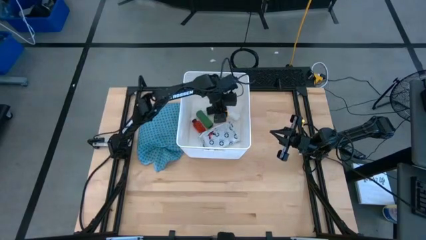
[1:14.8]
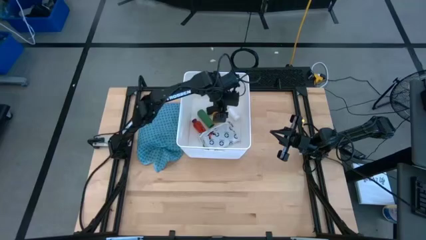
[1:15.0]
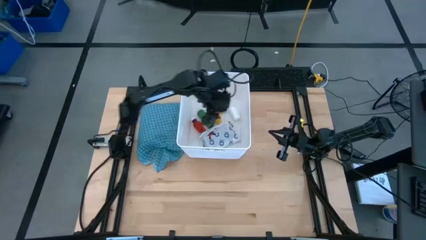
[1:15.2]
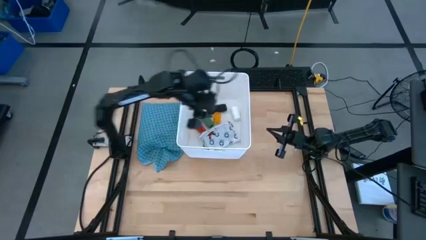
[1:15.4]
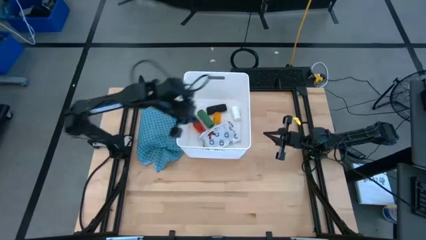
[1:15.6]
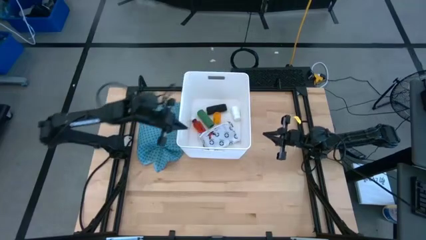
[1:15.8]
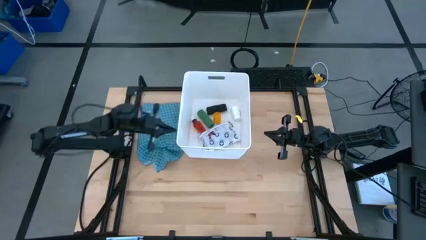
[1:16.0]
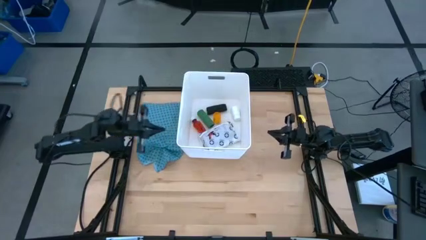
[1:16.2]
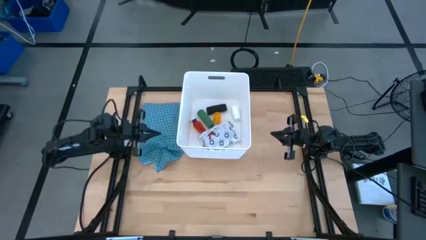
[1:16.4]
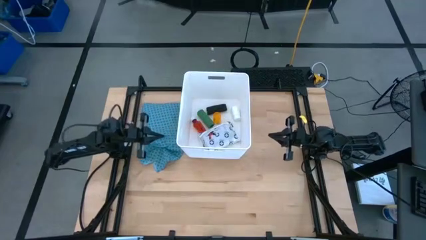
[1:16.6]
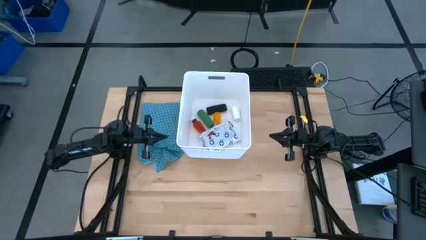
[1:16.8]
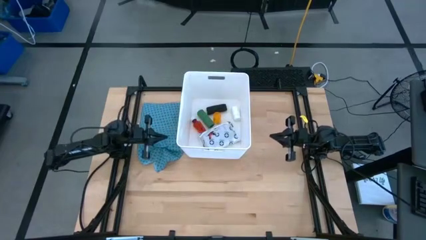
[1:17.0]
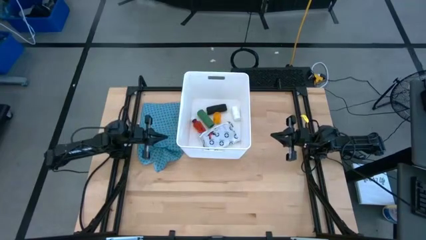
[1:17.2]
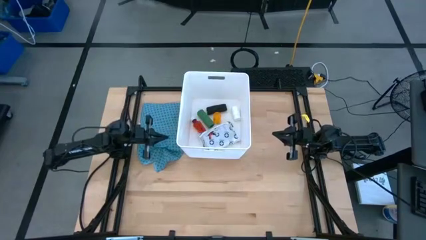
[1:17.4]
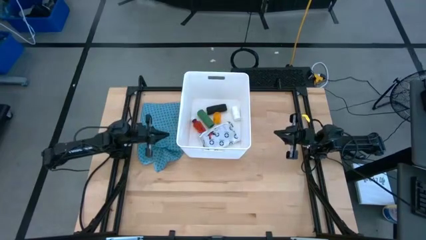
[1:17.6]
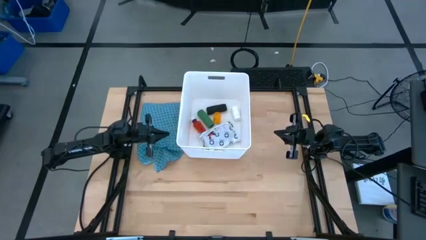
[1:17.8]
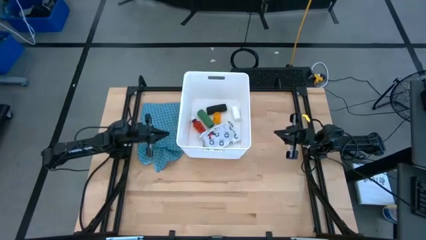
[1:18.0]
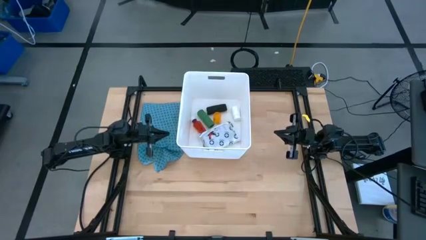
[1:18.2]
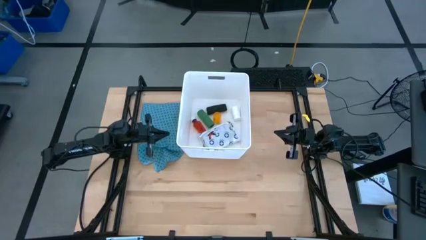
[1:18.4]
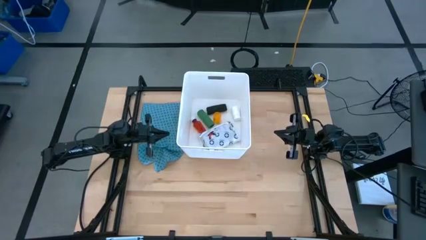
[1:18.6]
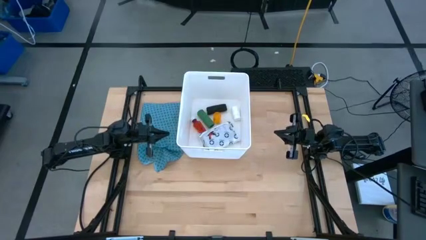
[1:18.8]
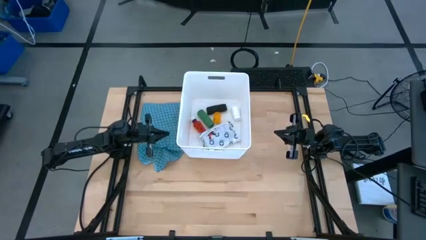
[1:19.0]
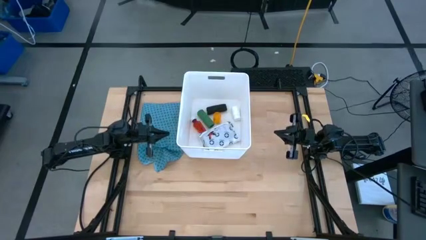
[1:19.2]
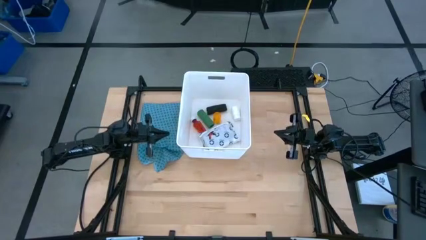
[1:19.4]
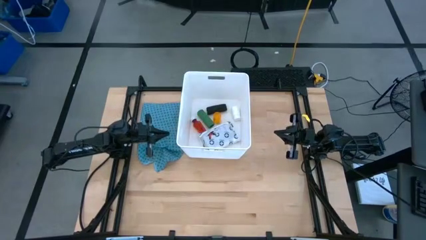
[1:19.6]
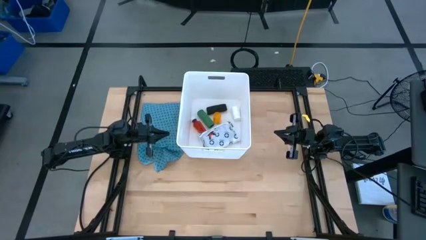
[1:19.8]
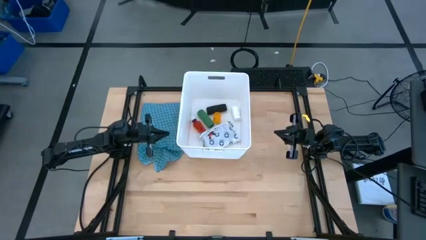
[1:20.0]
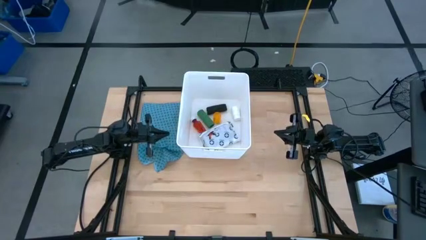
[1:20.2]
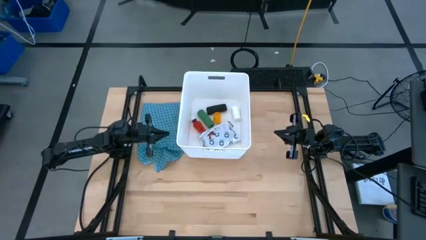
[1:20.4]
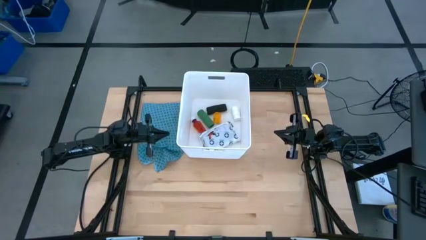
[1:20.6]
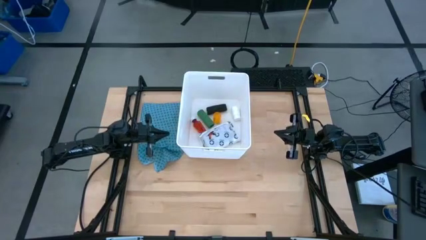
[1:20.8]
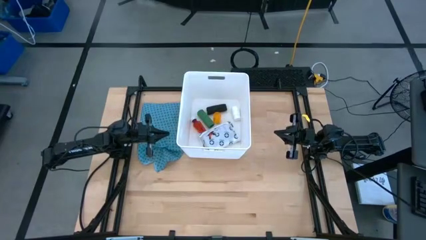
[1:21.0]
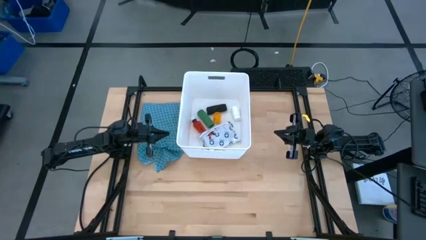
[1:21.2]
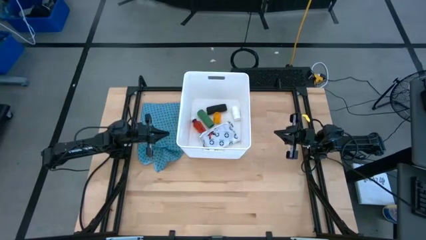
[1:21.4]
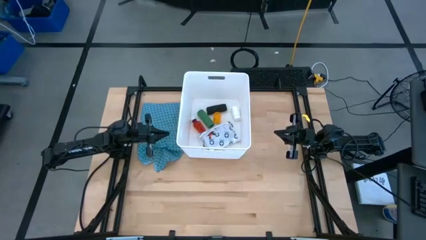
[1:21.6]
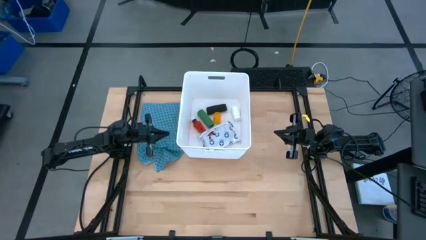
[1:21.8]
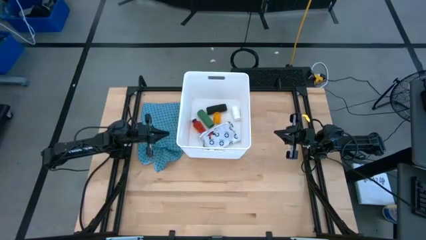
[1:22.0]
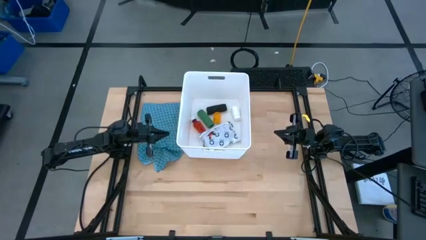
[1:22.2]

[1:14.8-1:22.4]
Task: Pick & place medical supplies in basket/bin
Return to Home Position

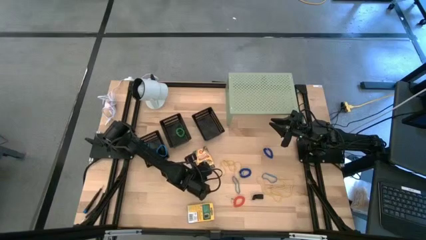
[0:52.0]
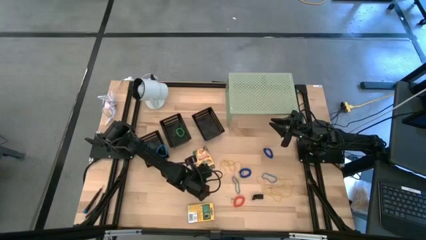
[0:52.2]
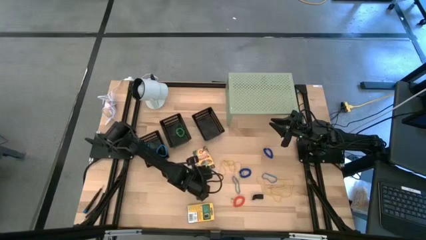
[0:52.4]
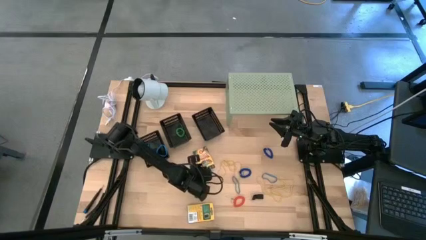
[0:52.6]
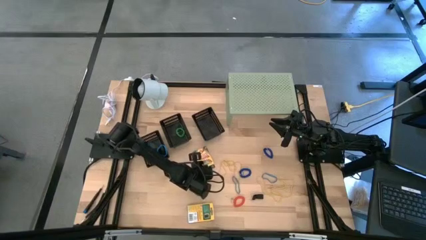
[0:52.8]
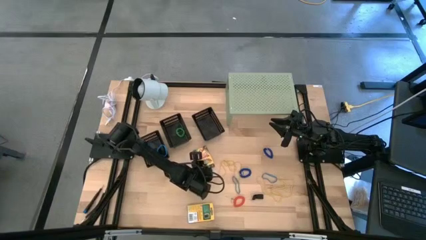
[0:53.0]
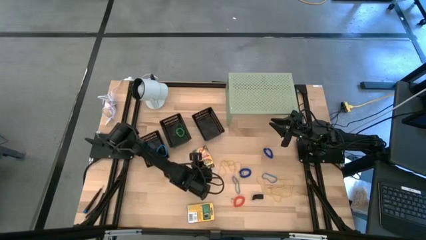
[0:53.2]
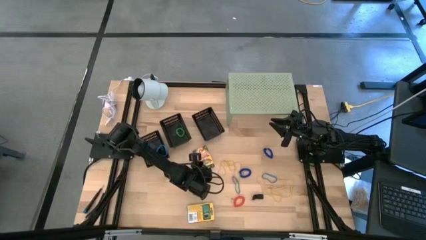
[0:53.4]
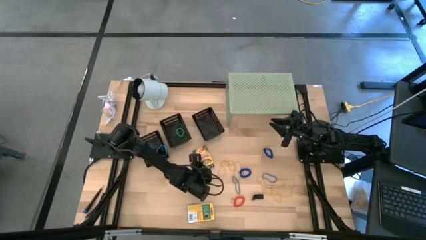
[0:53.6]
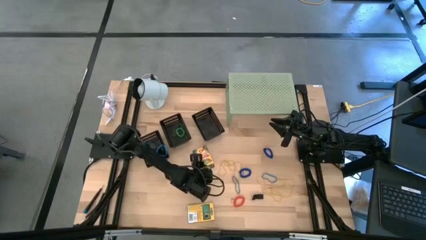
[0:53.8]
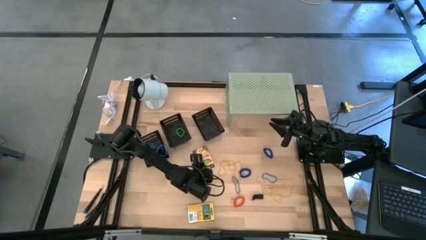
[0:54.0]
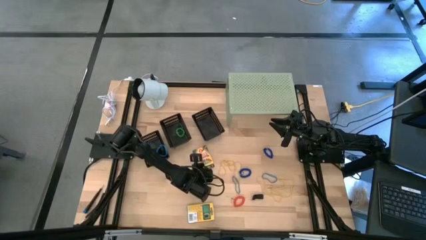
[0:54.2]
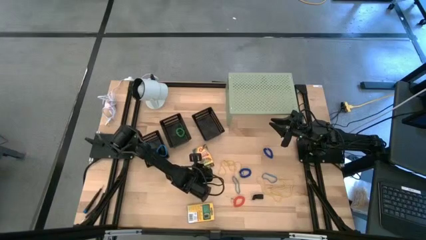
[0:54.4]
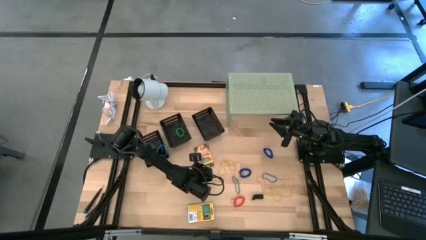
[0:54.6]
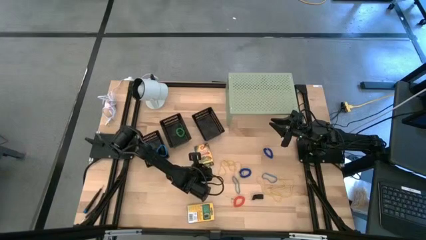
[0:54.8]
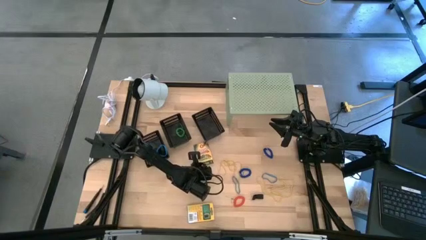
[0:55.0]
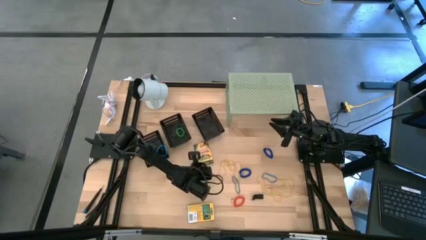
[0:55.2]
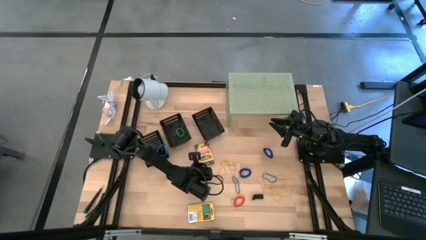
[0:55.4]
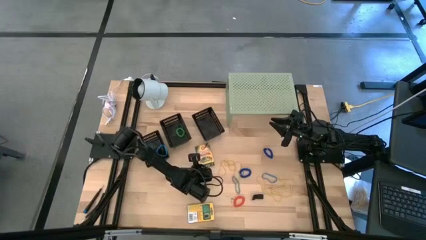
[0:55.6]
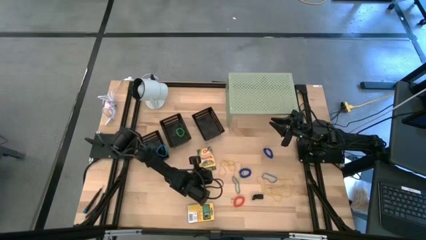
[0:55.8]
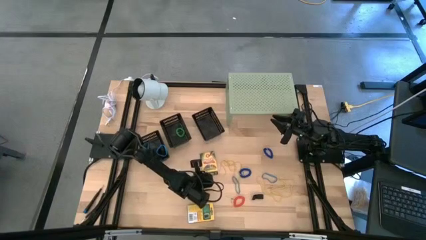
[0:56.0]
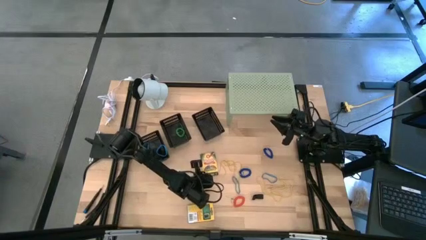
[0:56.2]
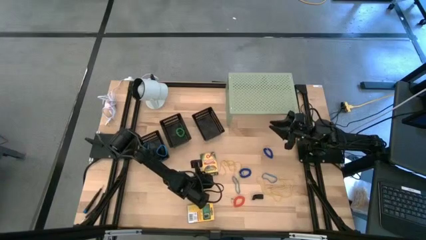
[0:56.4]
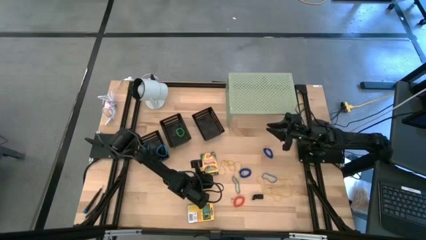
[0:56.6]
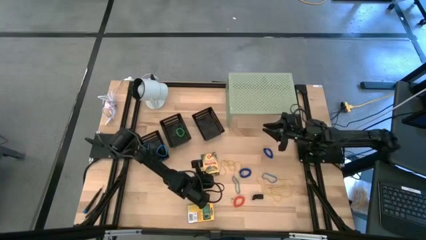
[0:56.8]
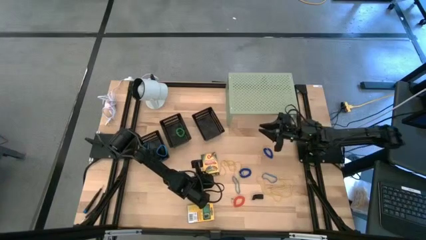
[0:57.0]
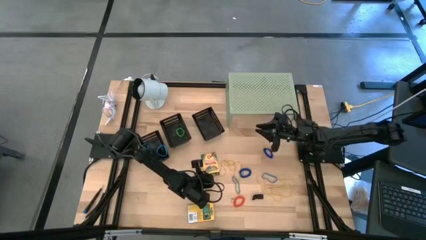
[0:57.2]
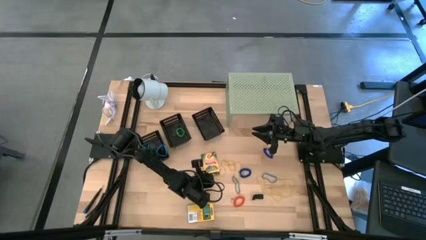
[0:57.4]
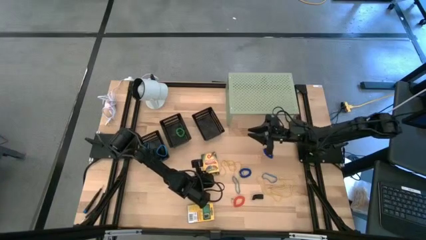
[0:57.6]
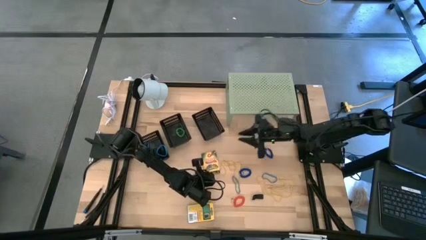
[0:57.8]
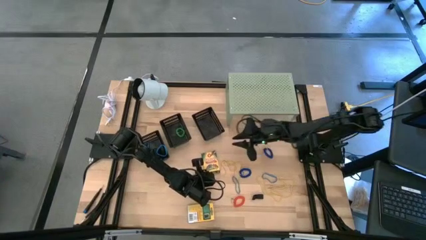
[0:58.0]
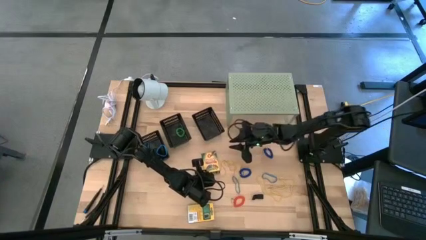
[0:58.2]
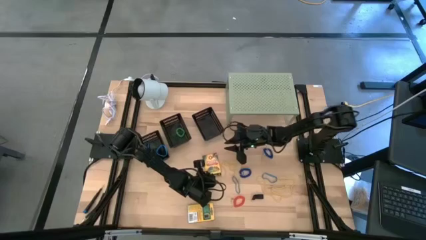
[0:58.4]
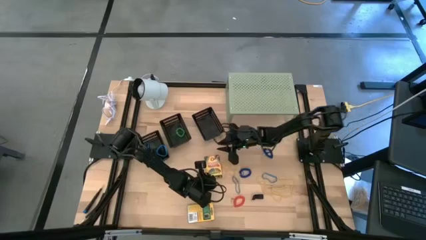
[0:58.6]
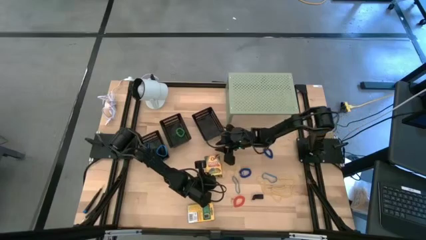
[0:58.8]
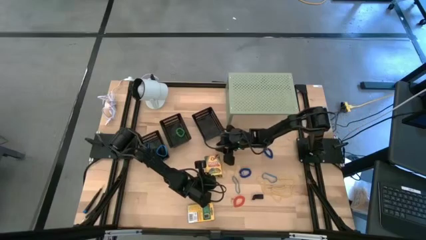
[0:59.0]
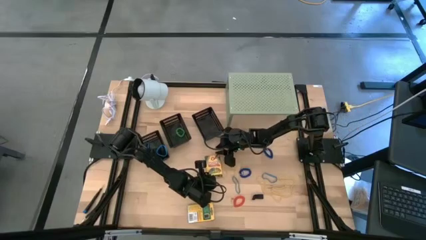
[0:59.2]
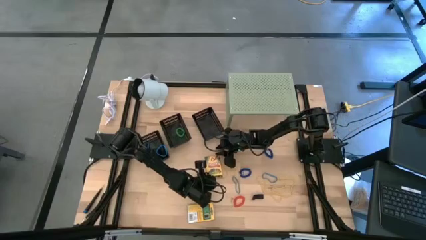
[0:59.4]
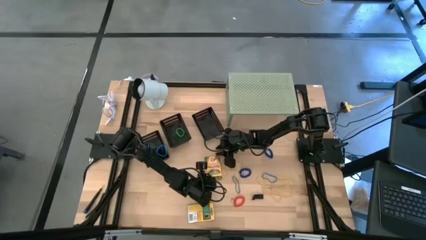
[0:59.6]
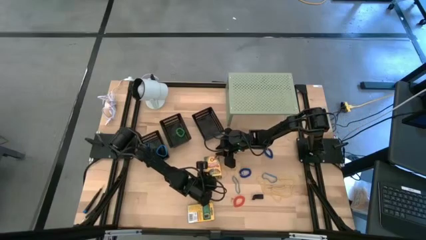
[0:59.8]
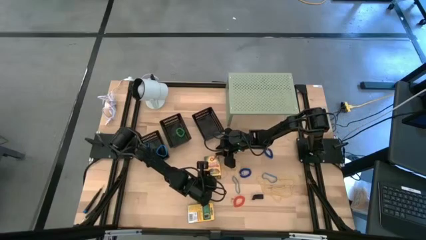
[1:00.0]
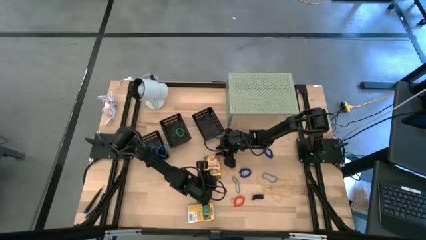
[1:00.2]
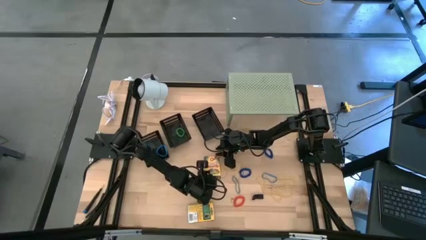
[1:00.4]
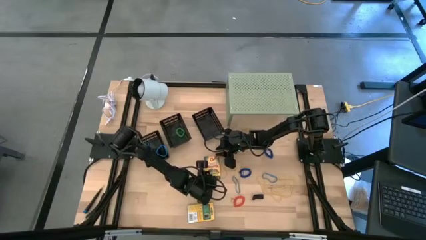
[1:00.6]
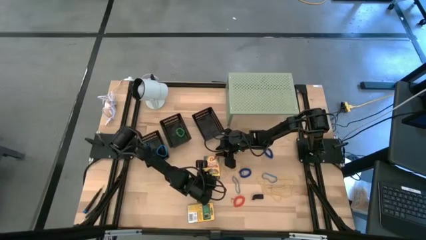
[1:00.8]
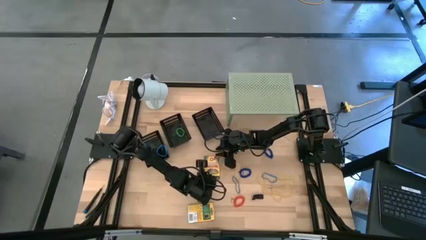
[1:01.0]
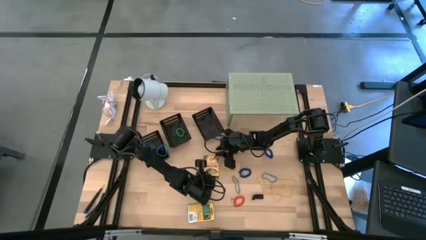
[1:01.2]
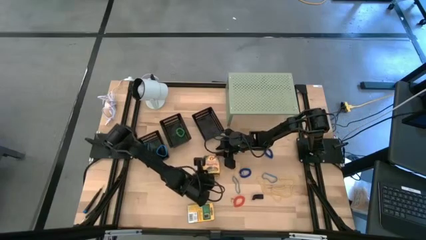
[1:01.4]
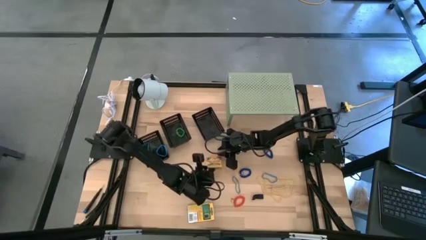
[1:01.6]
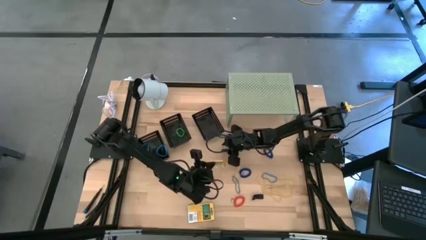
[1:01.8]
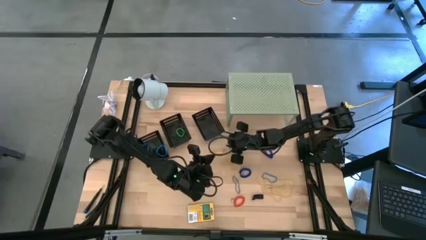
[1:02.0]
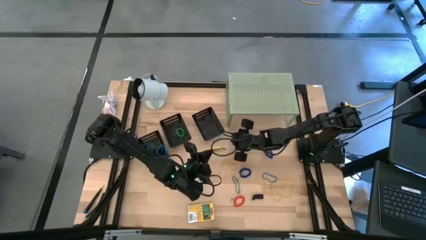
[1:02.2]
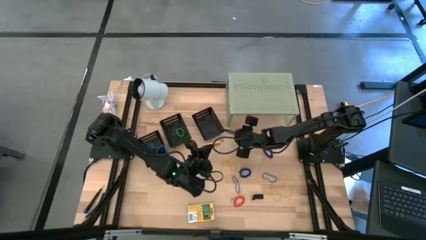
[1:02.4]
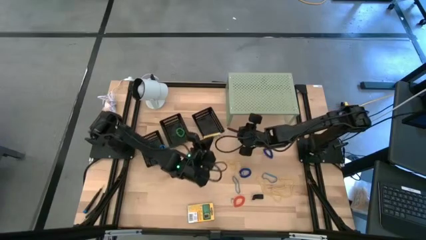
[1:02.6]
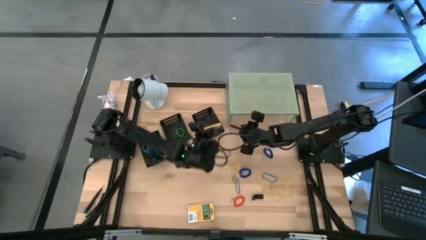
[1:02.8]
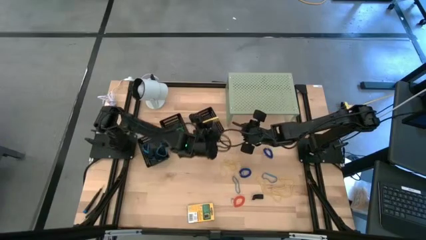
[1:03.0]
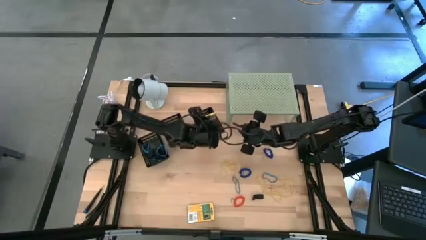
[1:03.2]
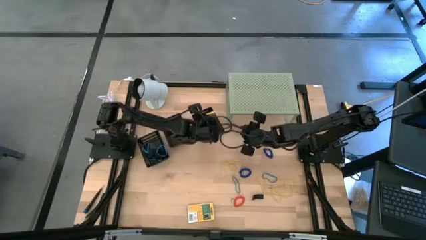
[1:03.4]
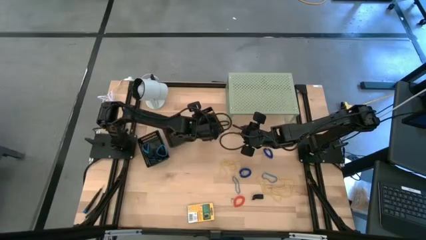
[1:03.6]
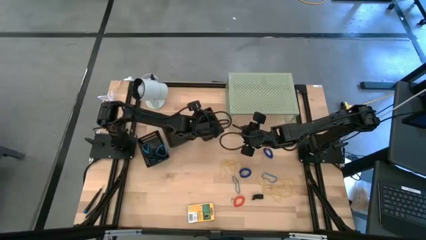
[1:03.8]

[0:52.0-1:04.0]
Task: Pick & Place Office Desk Supplies
Put the crayon pack into the right black basket
